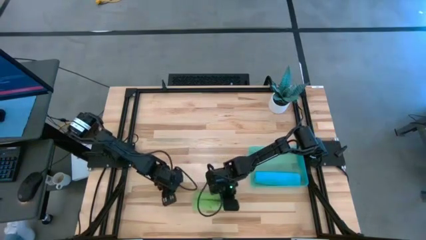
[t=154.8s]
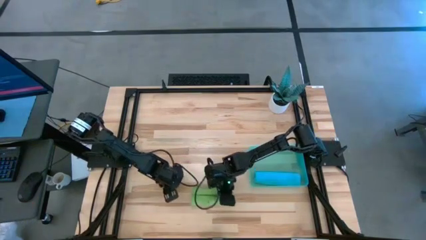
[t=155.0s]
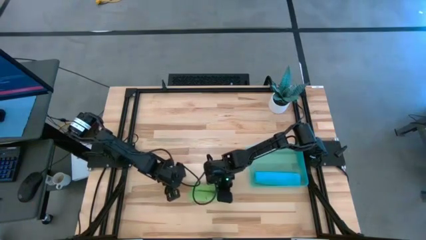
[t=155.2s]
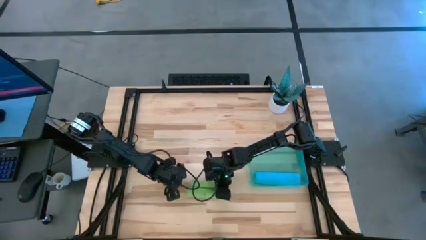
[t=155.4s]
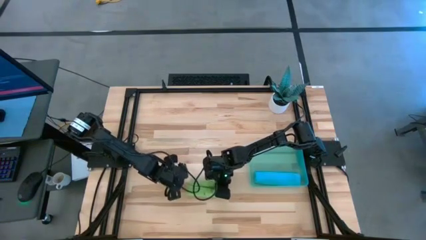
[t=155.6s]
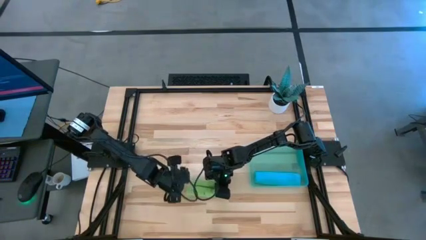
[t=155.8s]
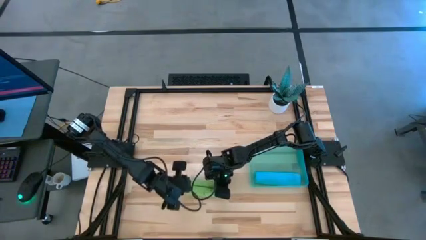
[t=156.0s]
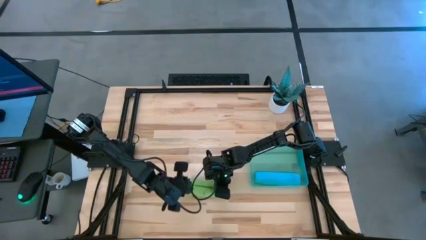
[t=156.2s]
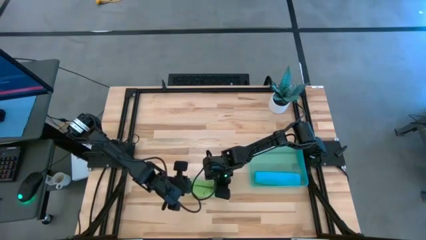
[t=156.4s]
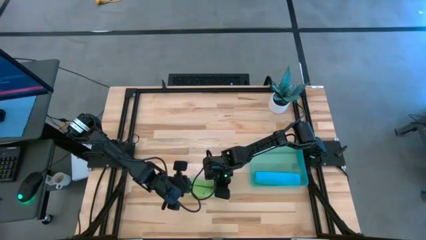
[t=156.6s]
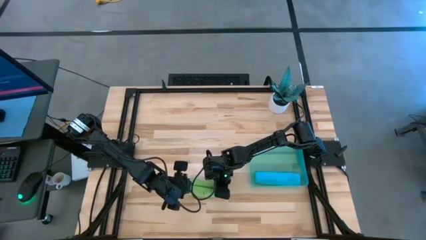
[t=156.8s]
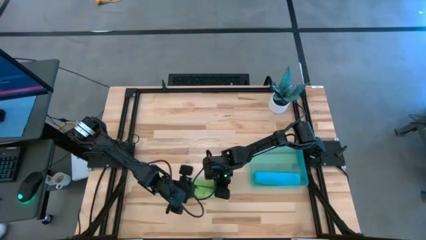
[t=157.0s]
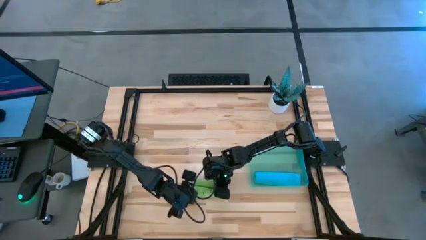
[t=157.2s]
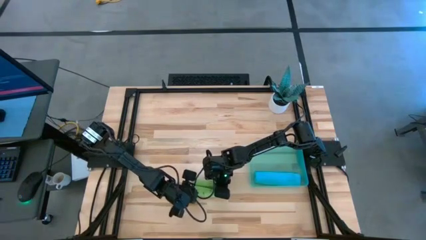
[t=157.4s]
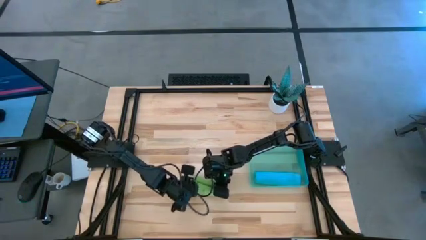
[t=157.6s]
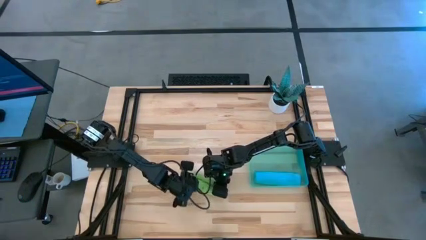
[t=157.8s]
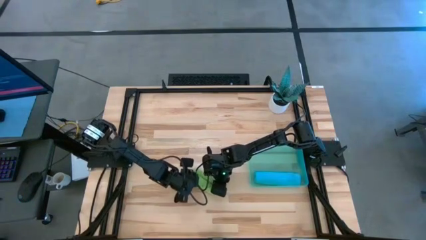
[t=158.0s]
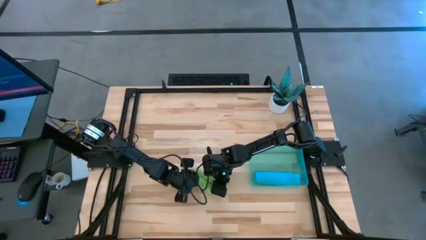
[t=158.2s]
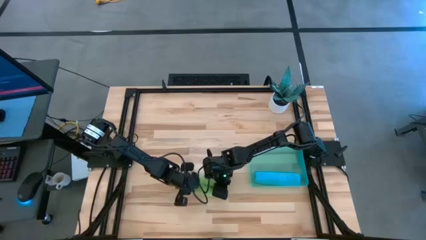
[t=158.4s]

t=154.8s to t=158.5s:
Task: Roll microfiber towels into tight, uniform cylinder then place into a basket
Roll the green microfiber towel

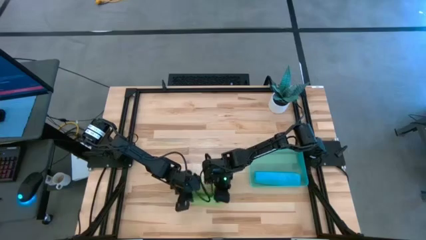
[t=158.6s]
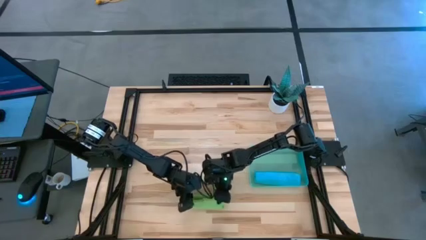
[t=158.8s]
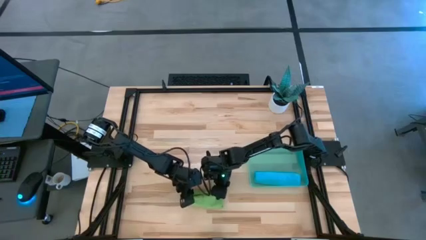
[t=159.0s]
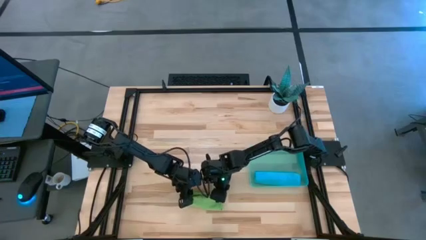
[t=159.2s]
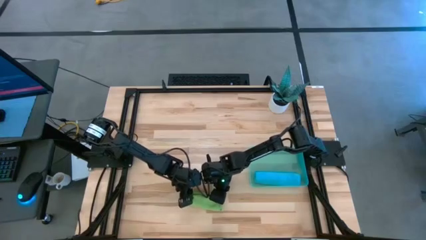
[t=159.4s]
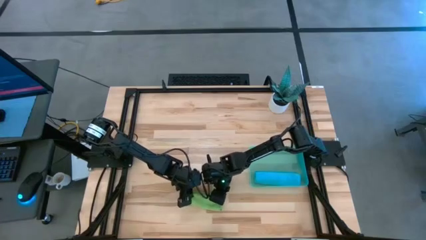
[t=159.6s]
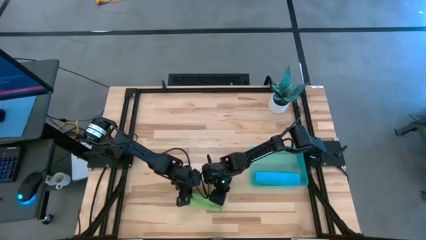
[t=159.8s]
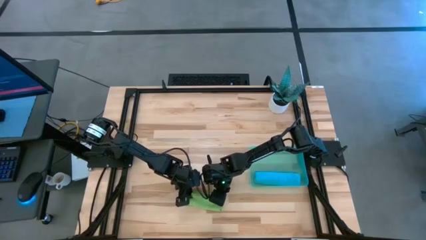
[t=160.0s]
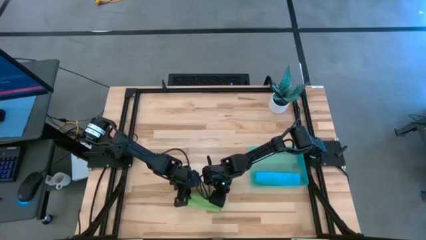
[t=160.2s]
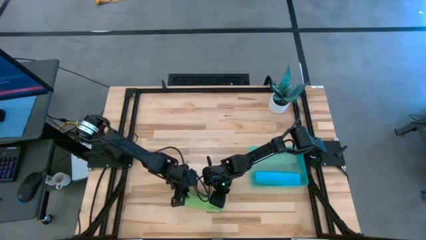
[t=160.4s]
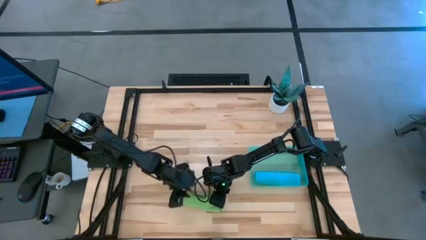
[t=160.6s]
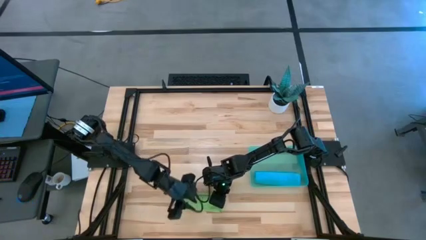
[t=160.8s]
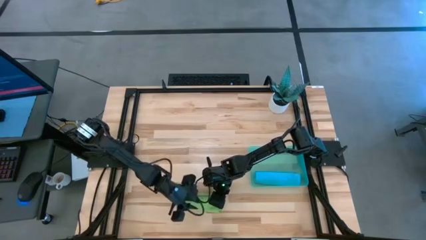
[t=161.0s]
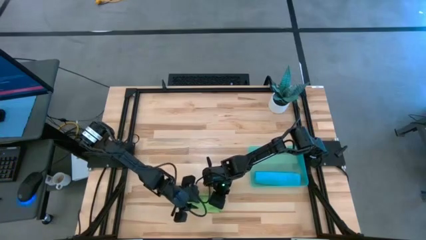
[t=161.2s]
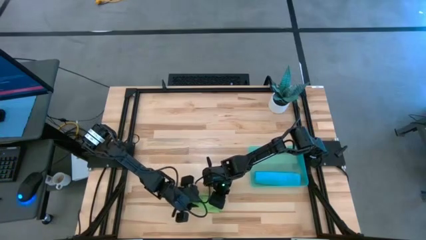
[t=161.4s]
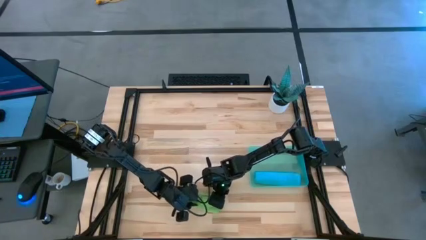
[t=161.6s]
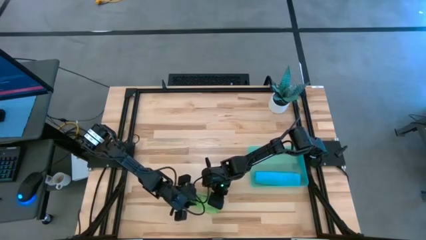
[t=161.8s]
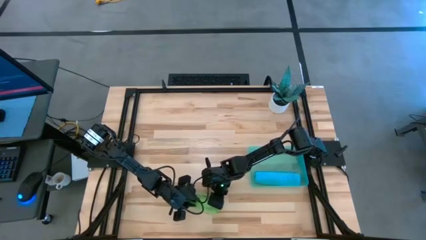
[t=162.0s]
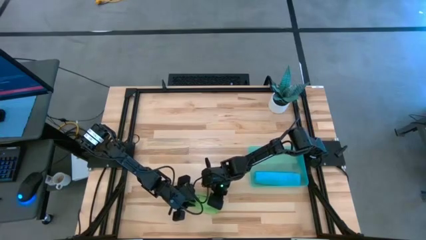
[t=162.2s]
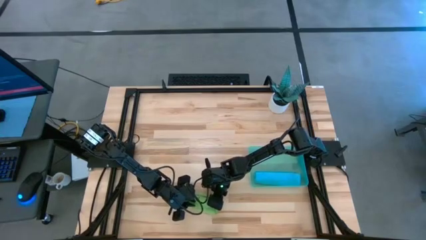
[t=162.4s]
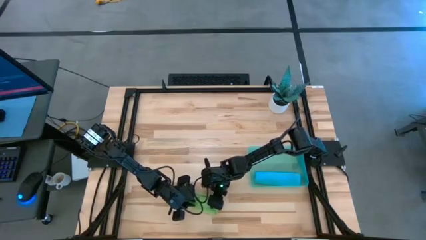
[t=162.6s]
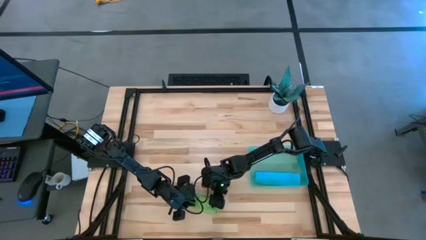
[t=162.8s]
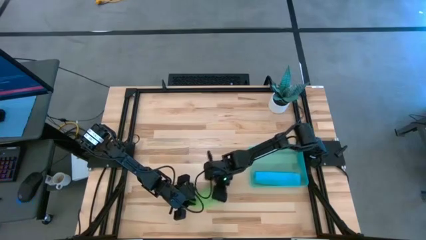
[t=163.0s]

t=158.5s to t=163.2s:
Roll the green microfiber towel

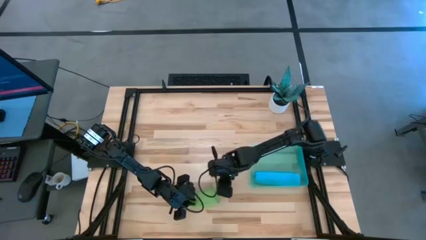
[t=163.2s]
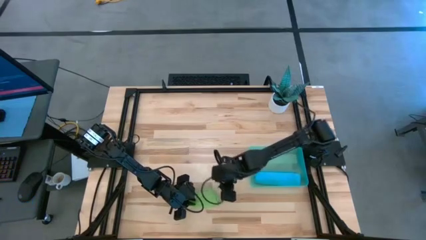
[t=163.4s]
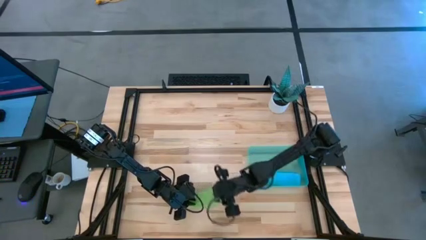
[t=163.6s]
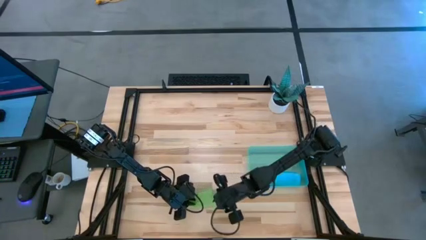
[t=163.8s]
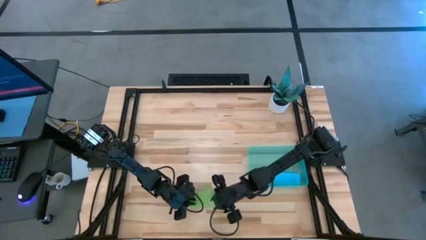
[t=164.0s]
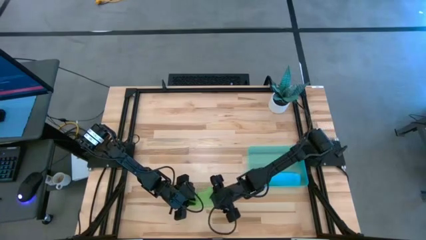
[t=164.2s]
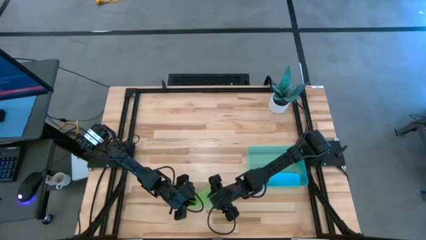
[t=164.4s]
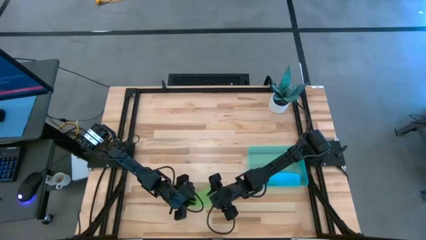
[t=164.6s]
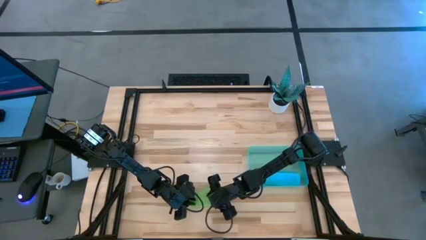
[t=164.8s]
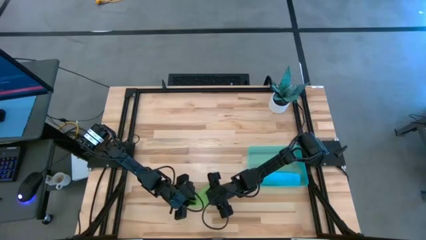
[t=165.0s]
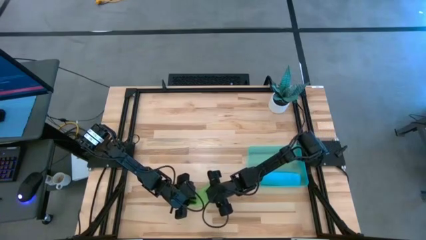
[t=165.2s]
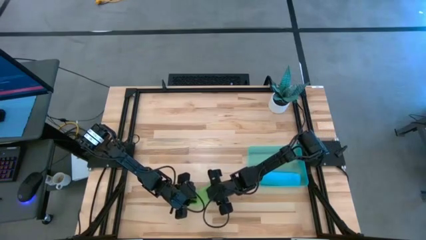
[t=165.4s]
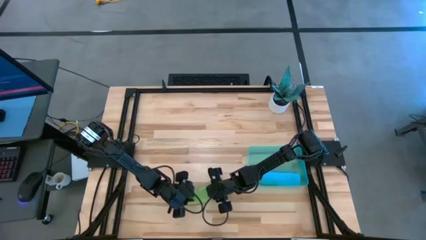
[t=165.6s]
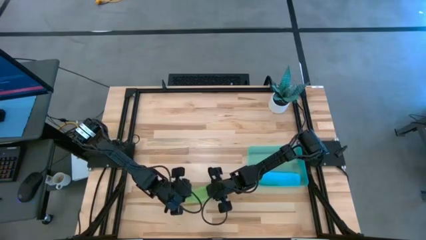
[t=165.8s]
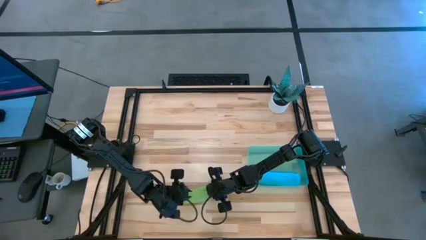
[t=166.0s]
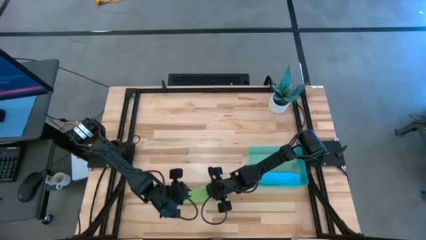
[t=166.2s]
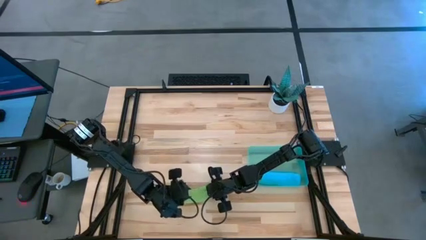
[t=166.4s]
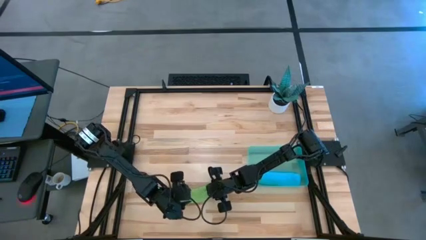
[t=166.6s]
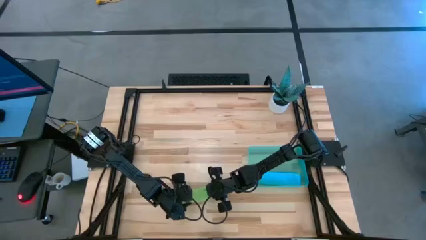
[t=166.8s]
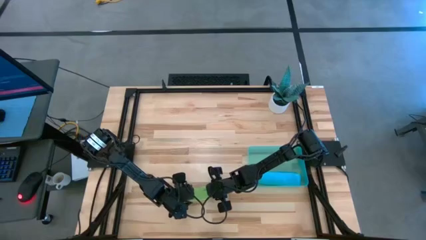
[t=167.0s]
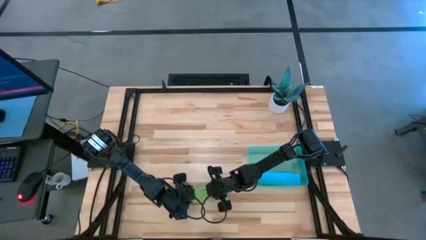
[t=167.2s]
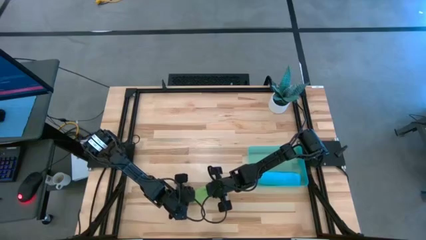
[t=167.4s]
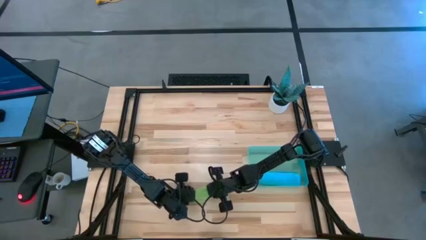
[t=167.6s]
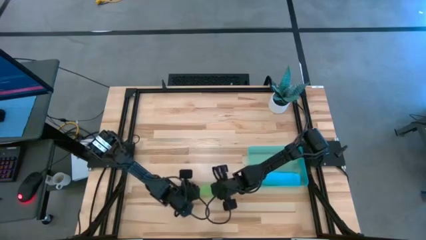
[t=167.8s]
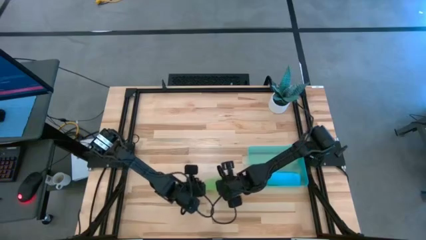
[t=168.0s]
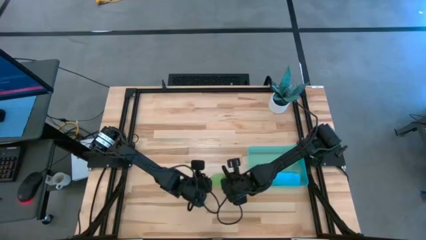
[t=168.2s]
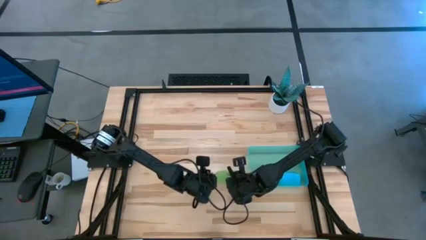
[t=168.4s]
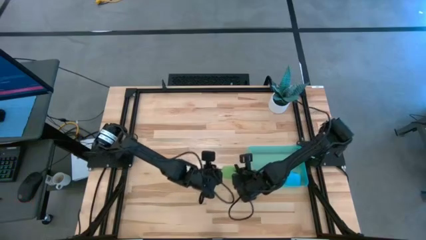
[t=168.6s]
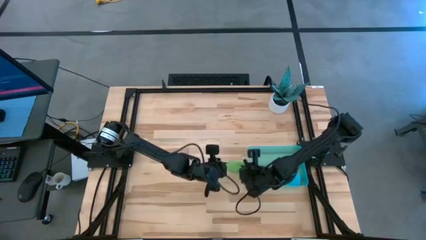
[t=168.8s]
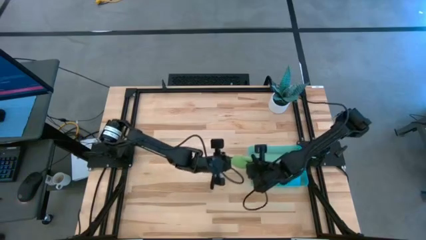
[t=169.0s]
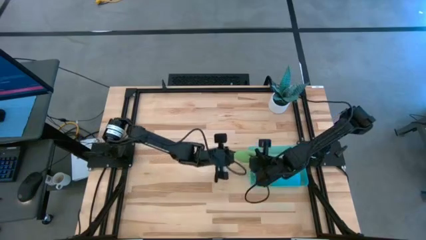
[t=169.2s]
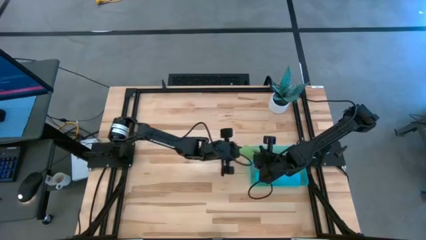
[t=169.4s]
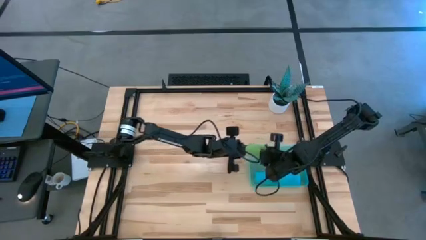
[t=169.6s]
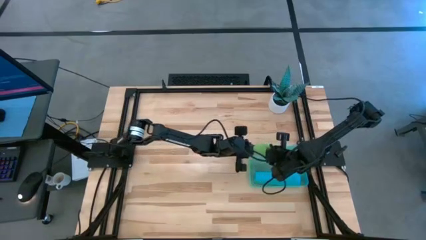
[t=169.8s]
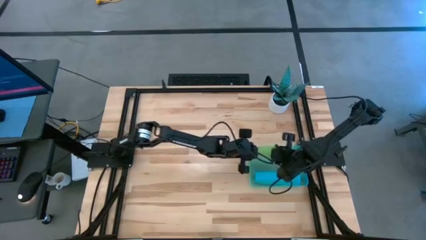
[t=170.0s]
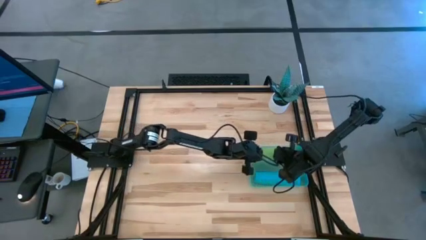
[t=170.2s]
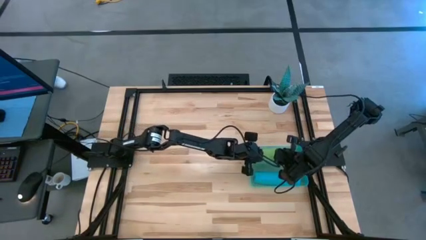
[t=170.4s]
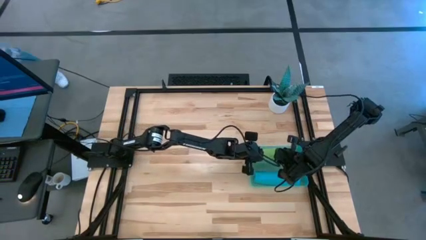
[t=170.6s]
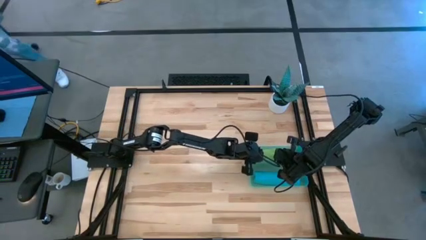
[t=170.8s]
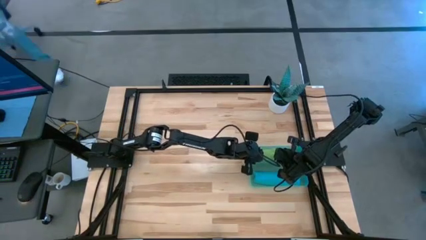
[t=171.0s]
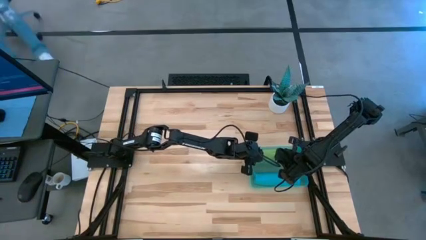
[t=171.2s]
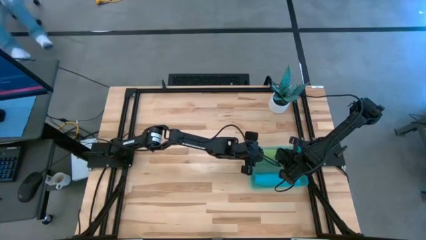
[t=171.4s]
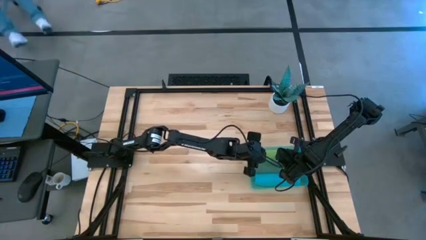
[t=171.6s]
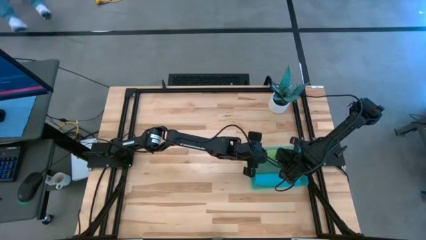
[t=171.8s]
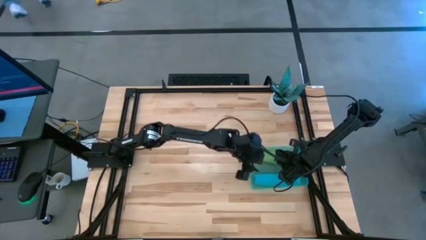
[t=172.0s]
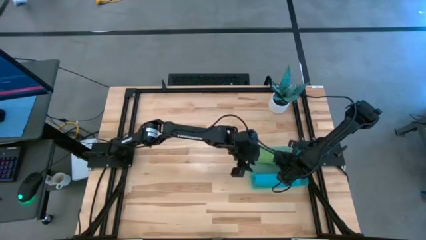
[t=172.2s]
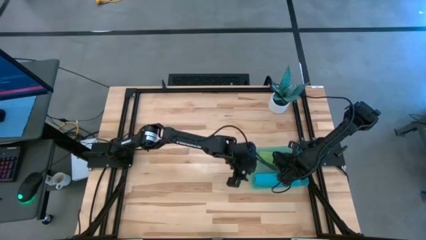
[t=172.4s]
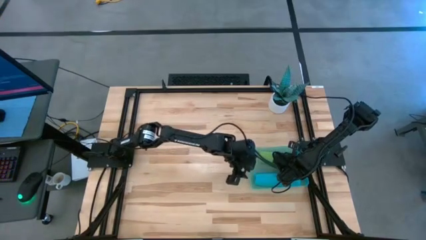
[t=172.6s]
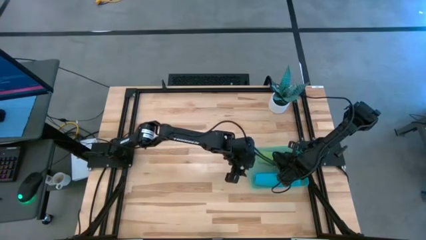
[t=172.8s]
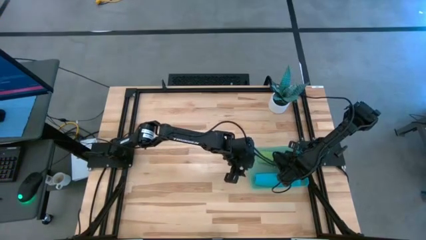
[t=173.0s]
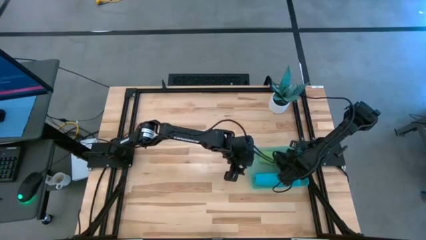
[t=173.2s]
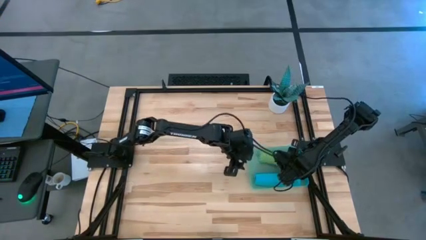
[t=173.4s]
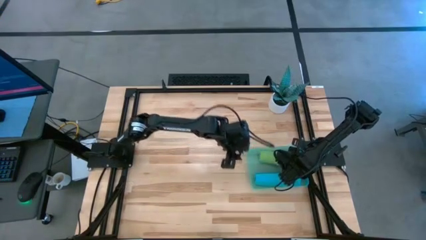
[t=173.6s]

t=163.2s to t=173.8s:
Put the rolled green microfiber towel into the blue bin
